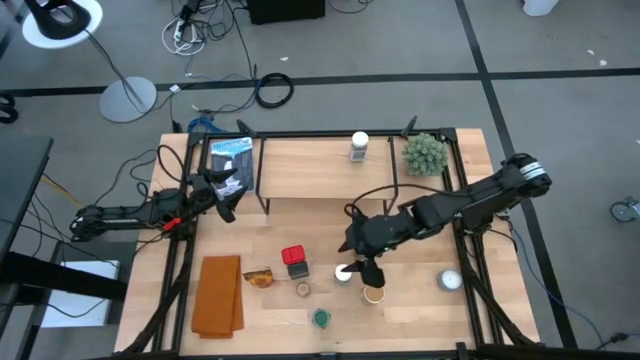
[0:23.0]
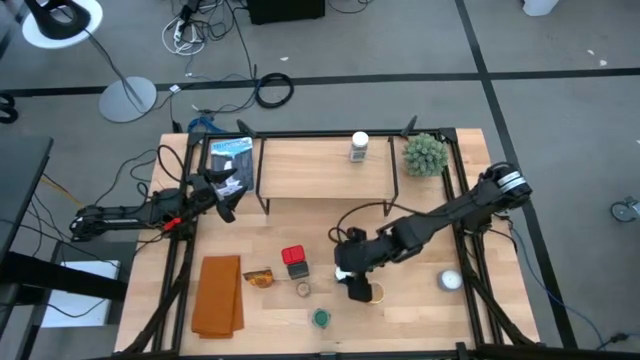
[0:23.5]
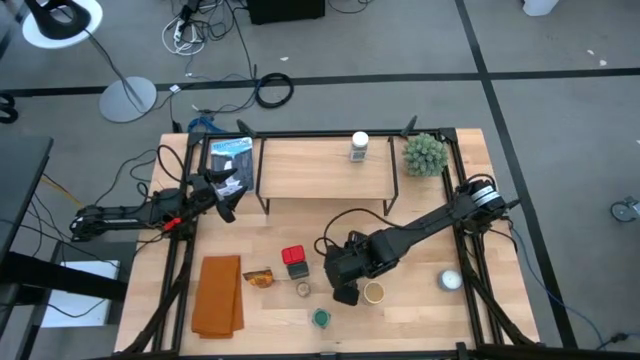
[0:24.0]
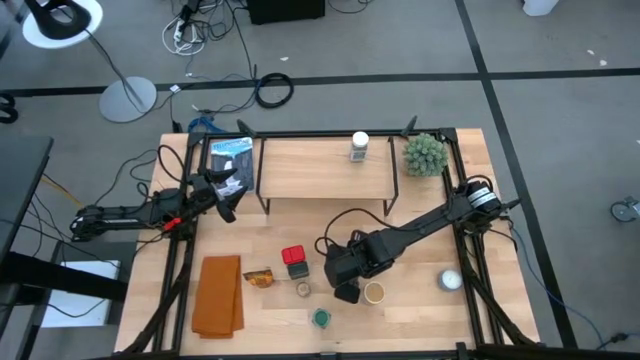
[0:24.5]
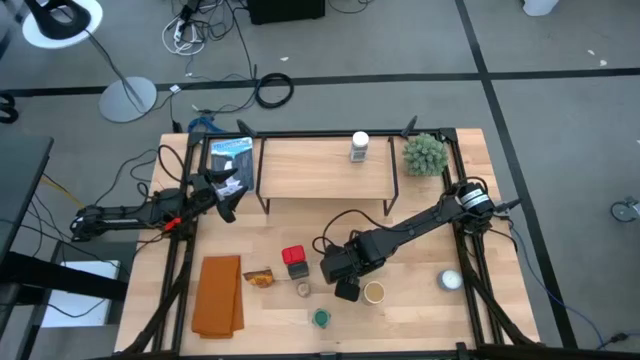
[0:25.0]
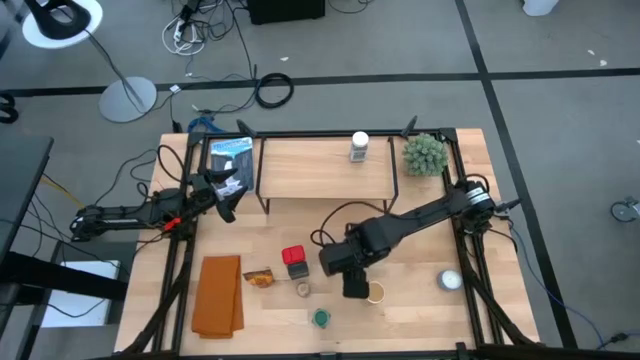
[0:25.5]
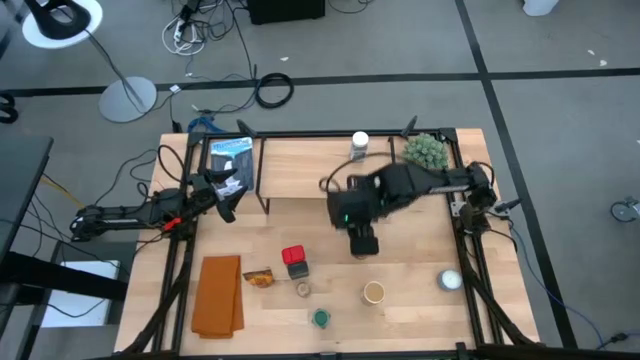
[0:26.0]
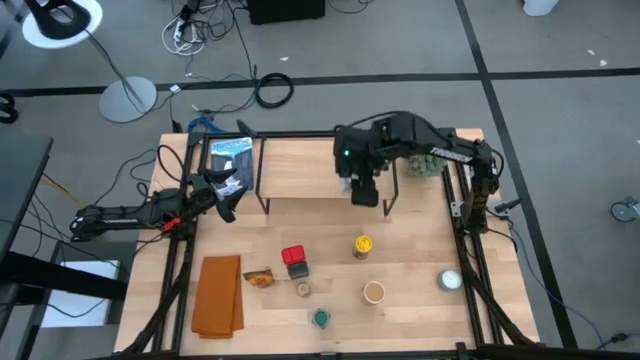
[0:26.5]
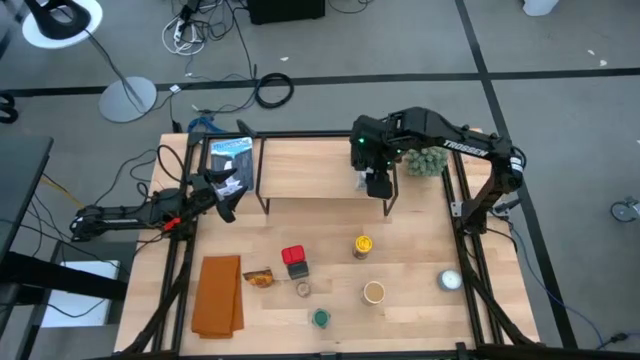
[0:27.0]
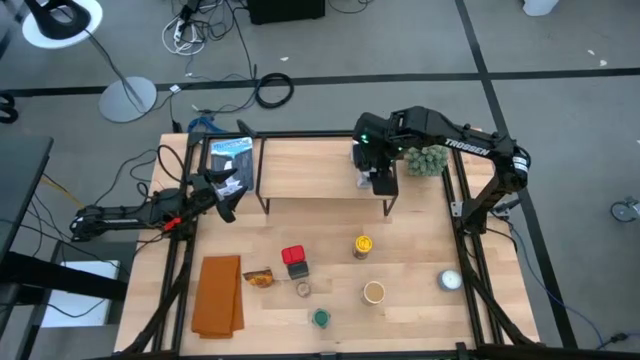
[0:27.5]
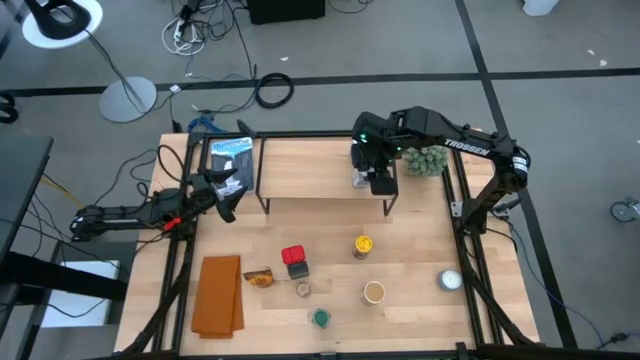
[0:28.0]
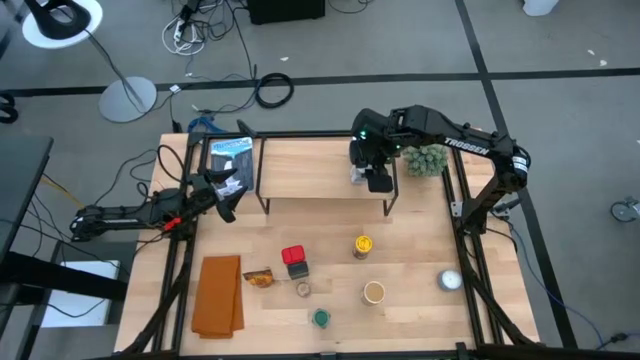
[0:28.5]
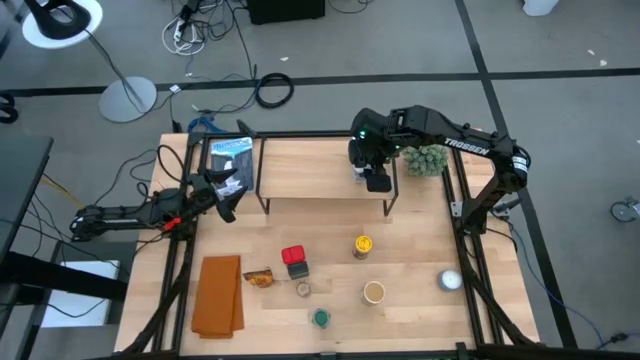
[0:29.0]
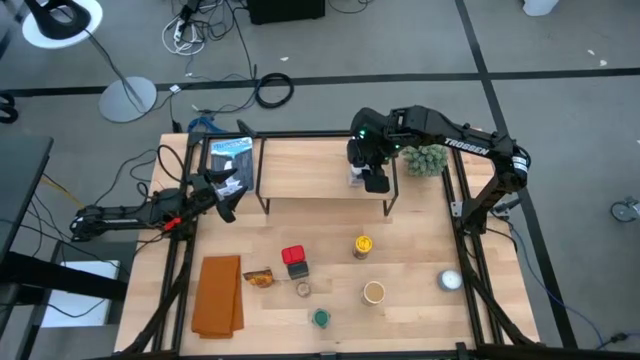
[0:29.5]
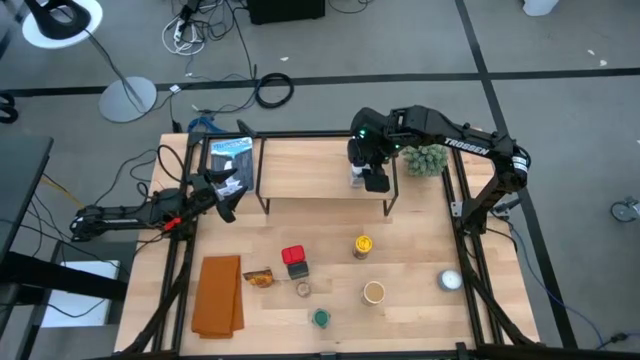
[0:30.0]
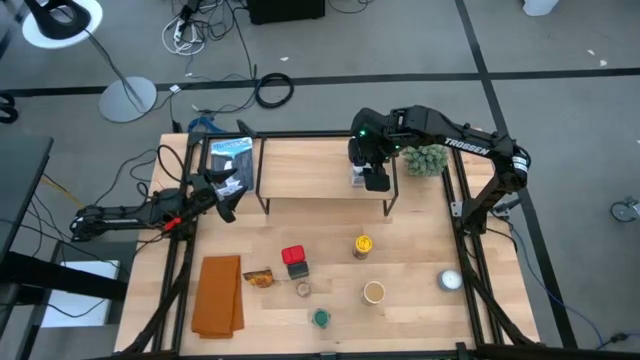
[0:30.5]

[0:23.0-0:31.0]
Task: Shelf spices
Put the white seasoning bottle on the shelf

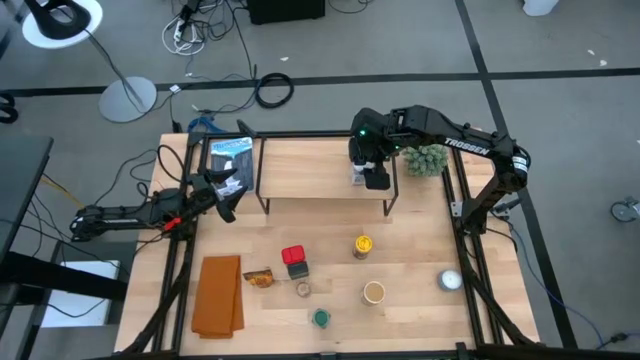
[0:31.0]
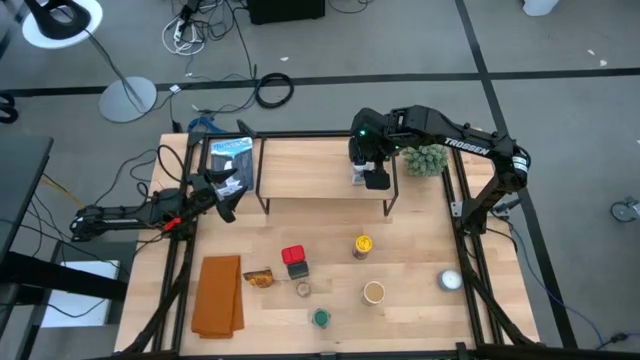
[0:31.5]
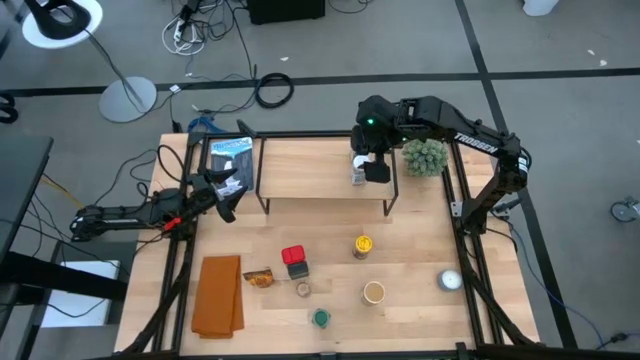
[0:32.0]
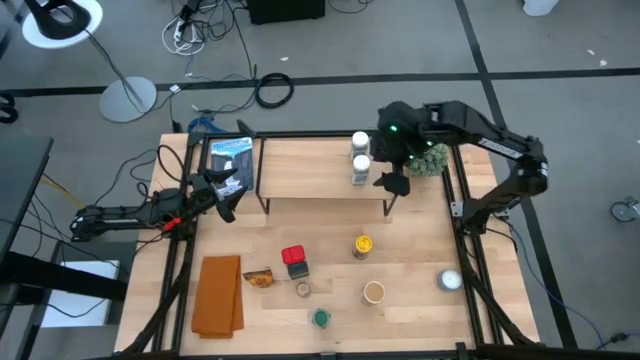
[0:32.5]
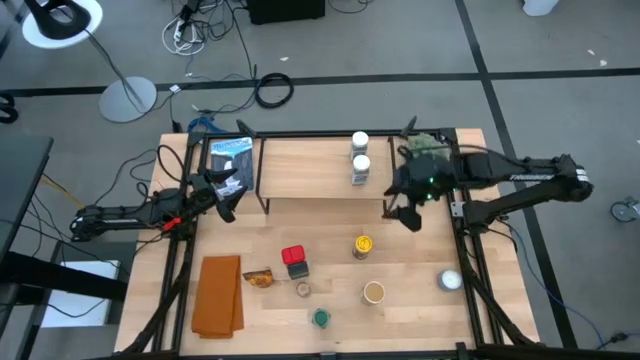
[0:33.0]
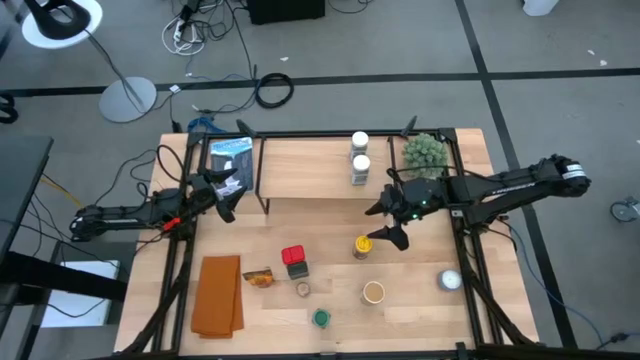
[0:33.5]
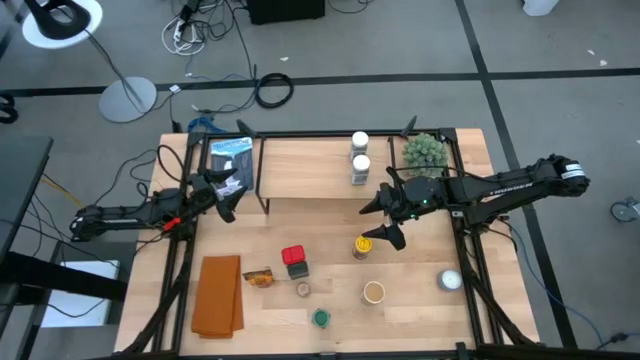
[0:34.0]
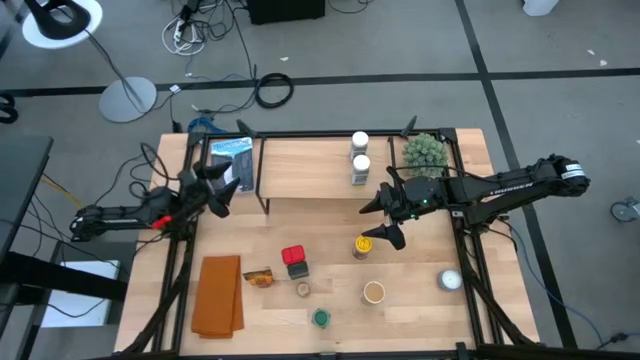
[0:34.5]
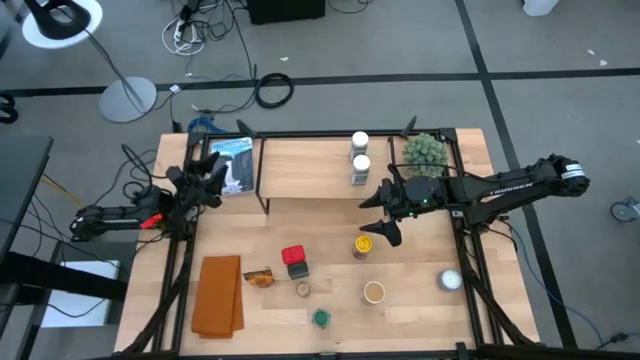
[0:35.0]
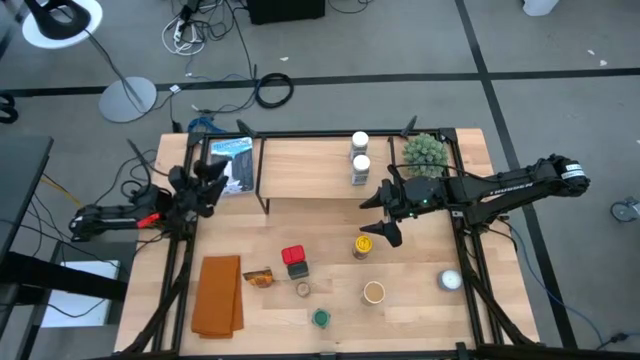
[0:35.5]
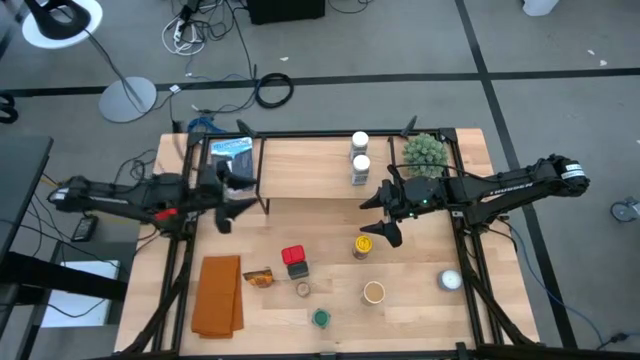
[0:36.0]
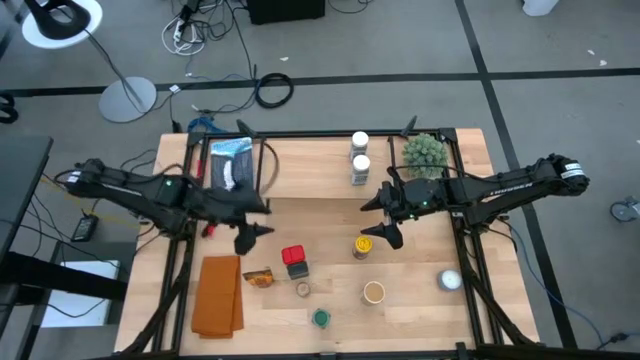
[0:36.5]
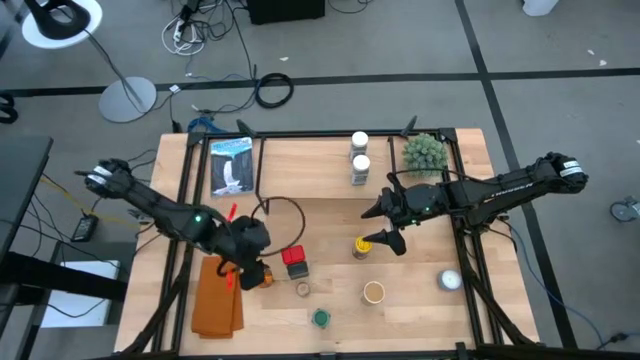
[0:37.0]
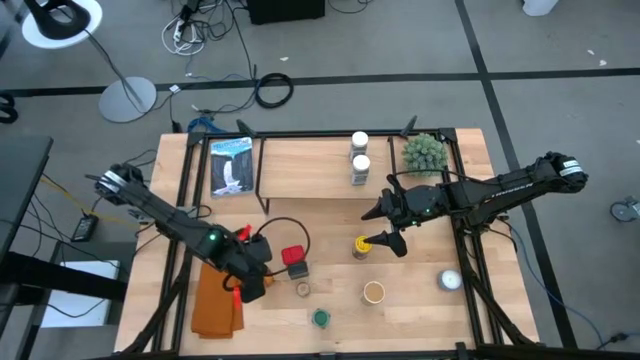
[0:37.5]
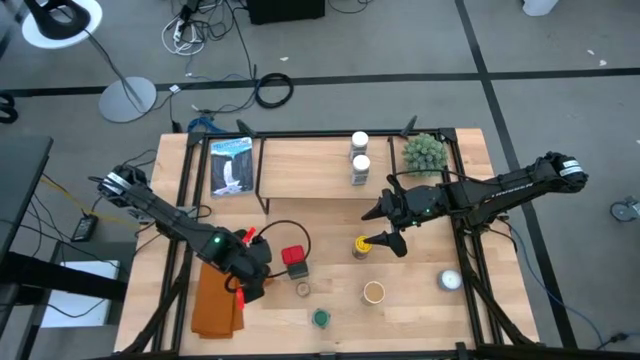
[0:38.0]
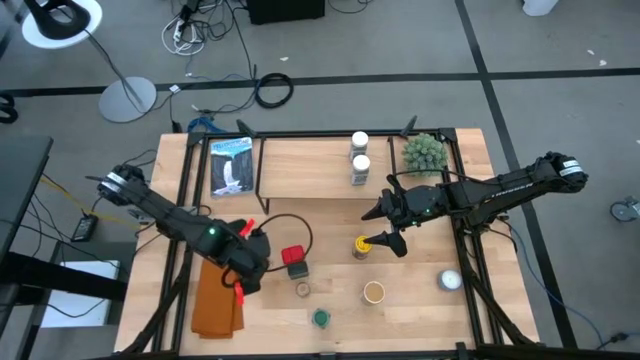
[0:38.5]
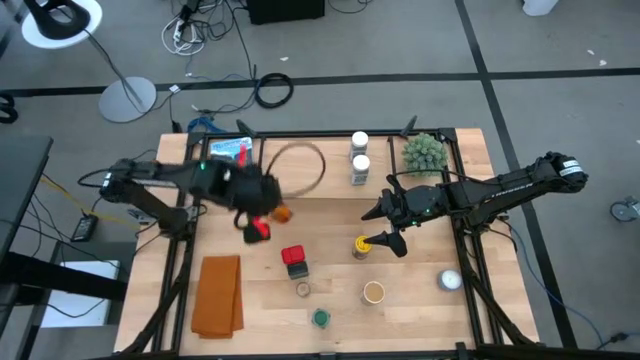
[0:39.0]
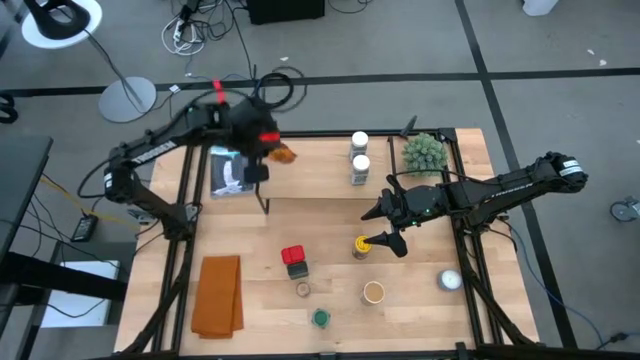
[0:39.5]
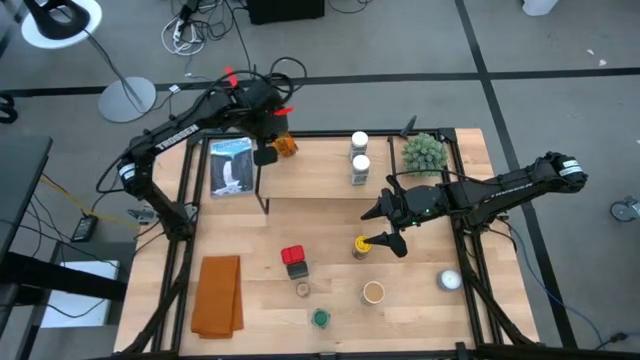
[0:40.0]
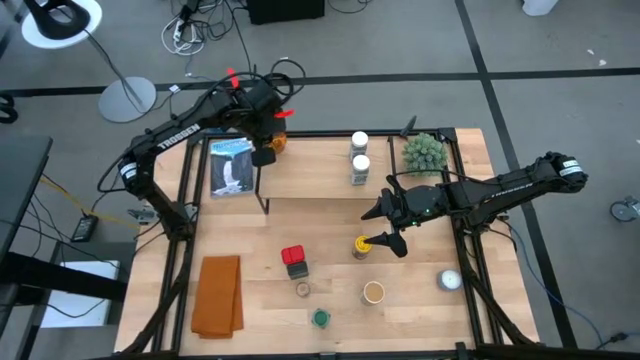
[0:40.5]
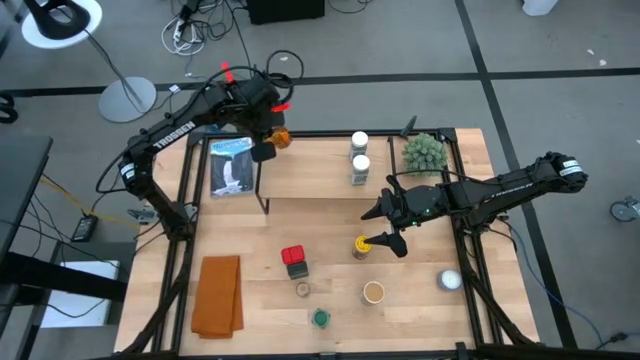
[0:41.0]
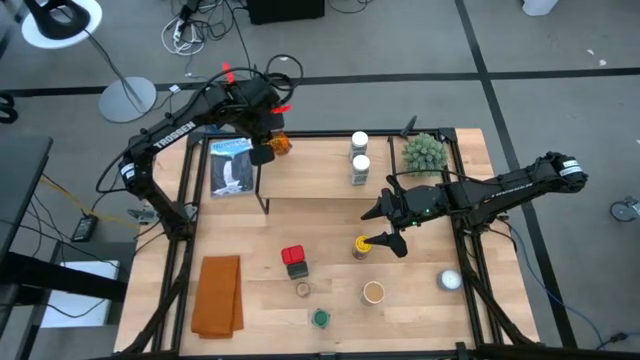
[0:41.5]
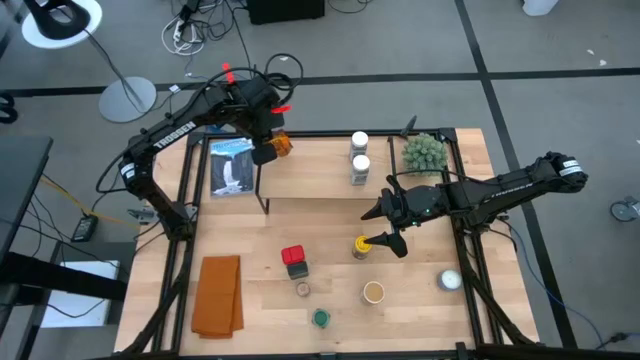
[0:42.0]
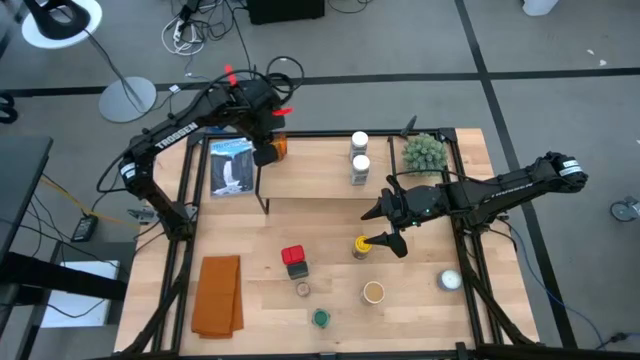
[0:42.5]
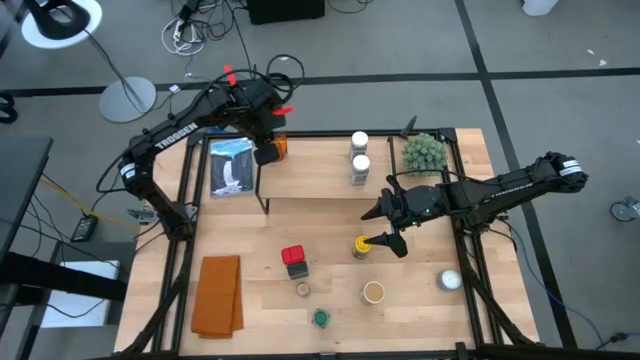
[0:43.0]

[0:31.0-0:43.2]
Put the brown seasoning pack on the shelf
